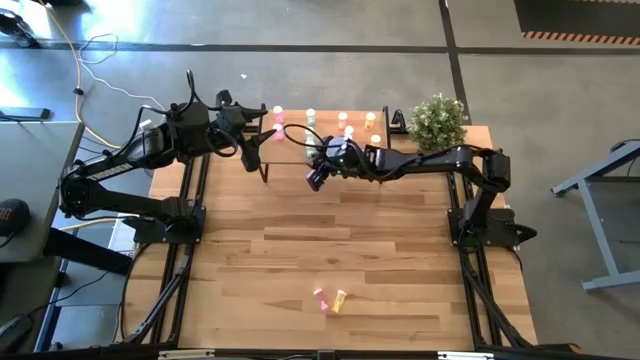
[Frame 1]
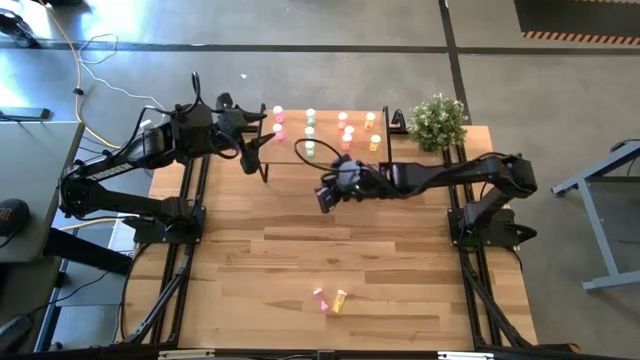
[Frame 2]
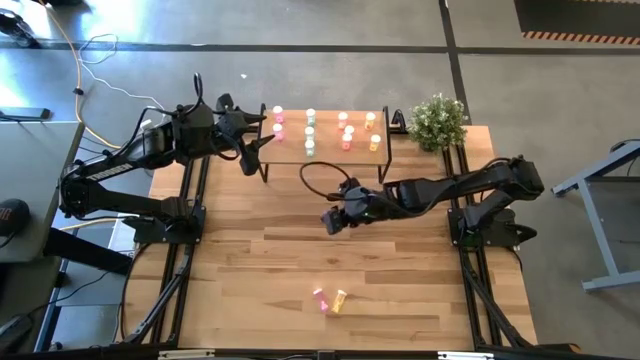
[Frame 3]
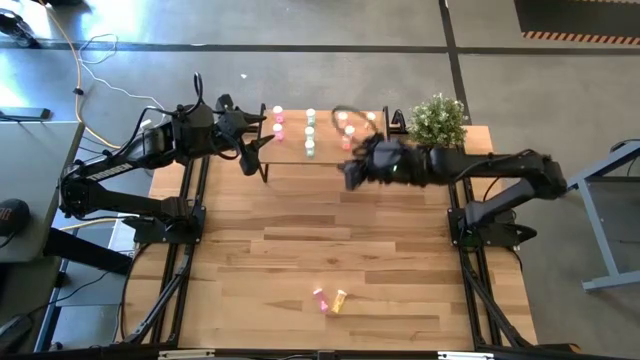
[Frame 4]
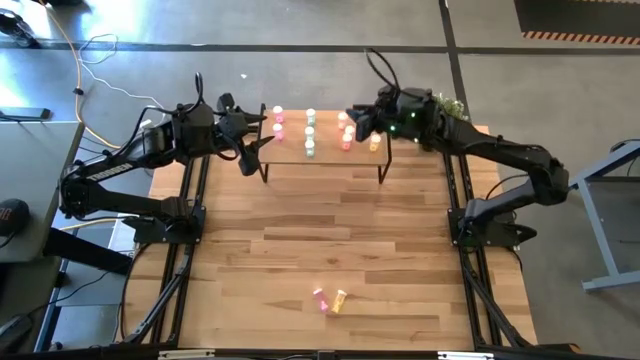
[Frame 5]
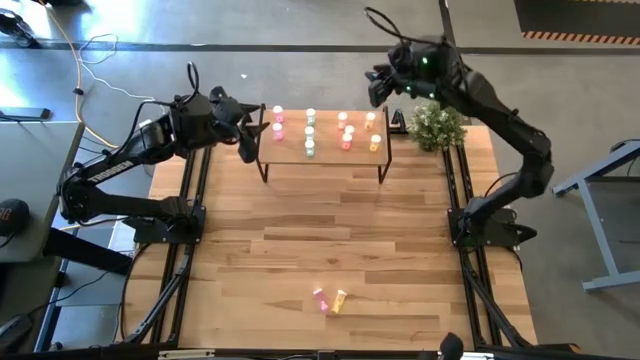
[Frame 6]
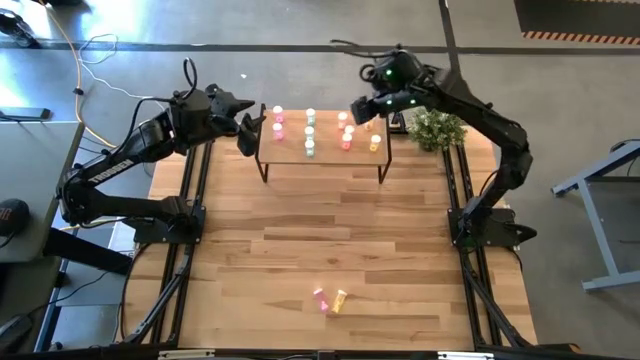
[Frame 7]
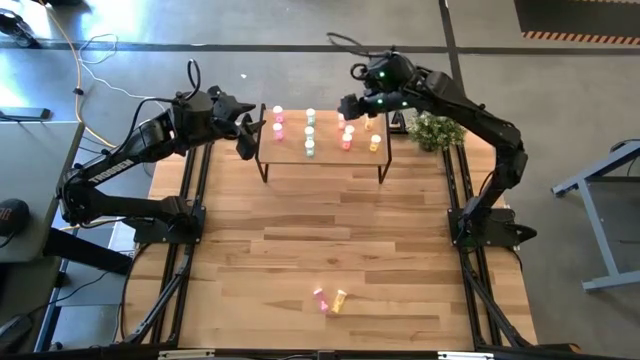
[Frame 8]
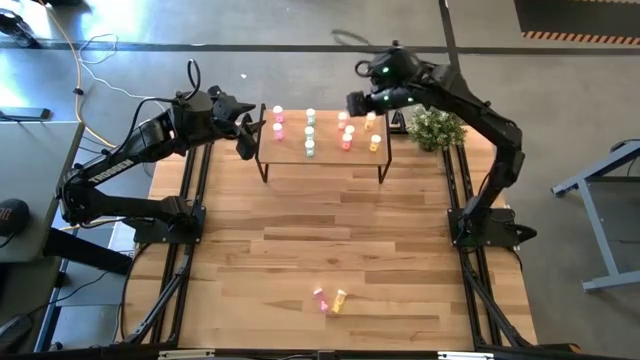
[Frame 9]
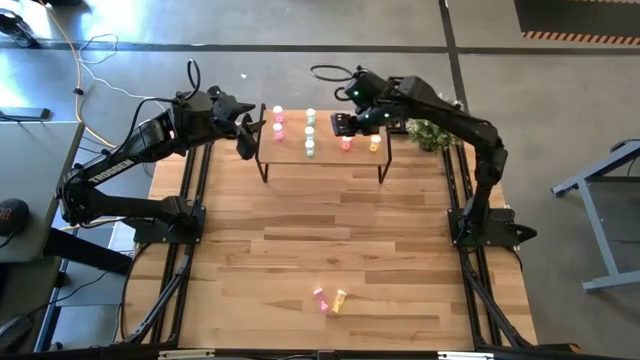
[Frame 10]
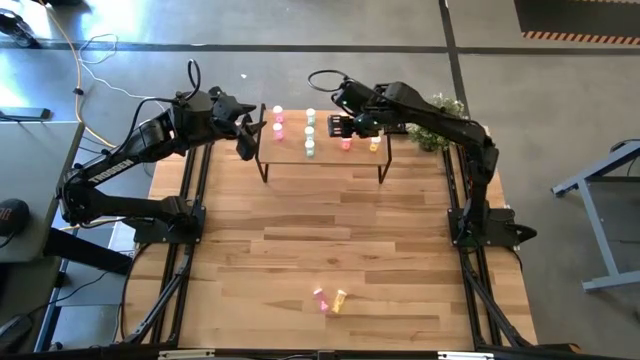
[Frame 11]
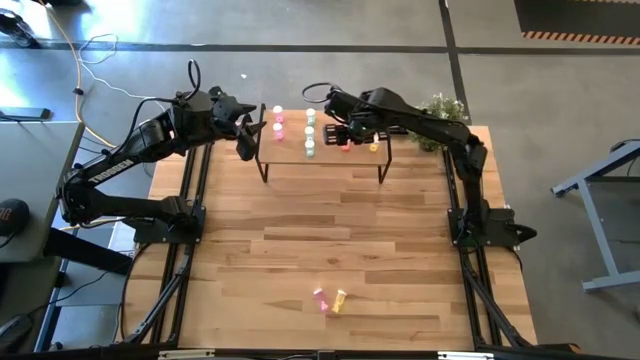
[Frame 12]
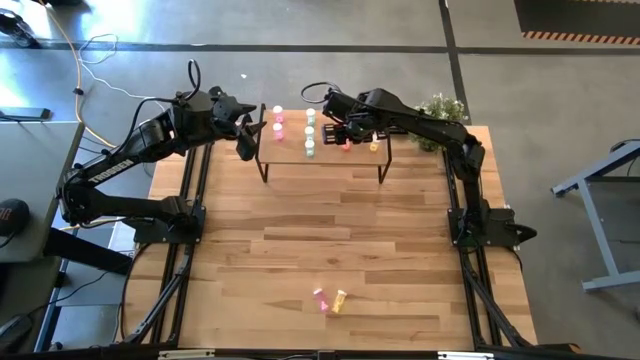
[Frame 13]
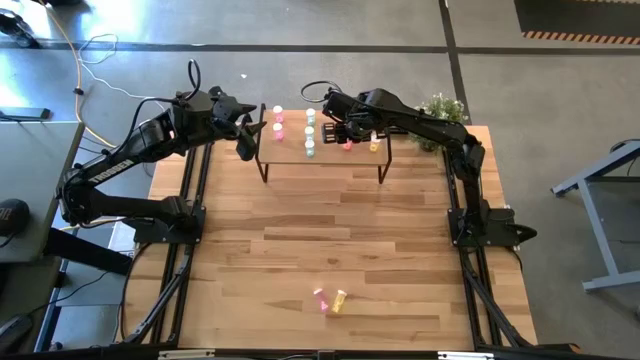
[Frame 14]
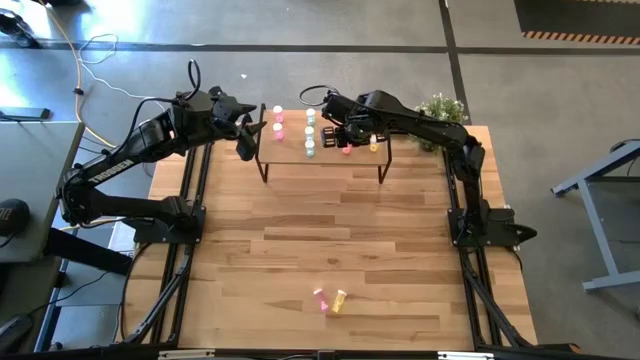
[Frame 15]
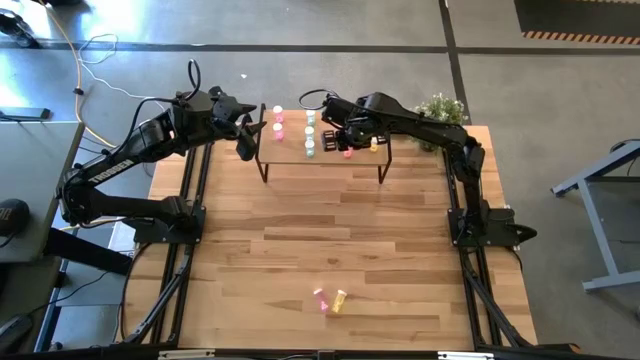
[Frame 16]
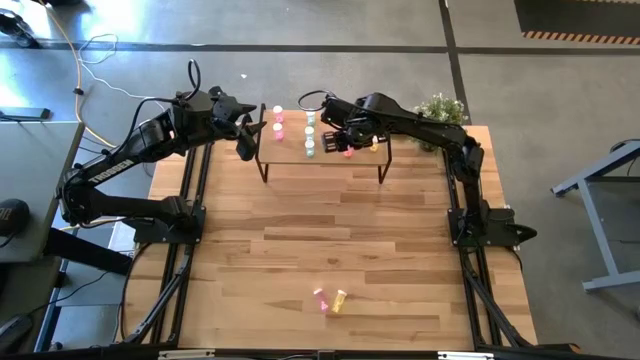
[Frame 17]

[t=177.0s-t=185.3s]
Task: Pick and place medicine bottles onto shelf by color
Adjust the orange pill bottle on the shelf

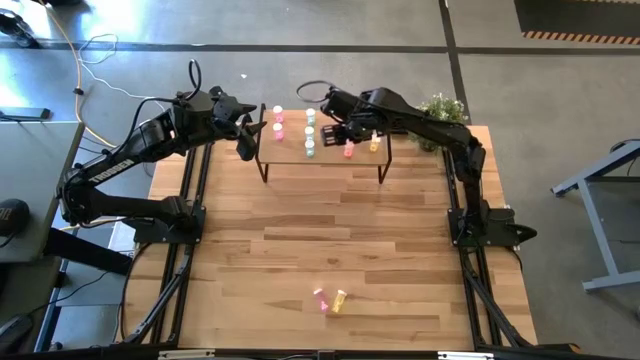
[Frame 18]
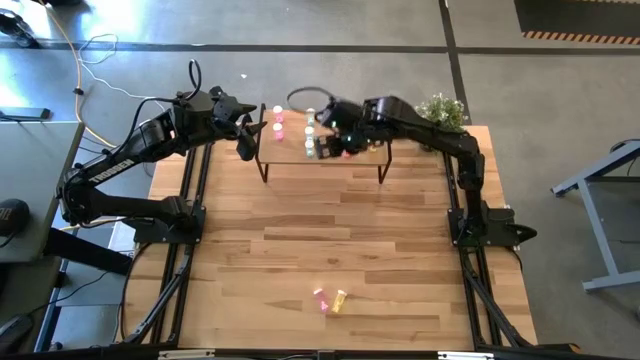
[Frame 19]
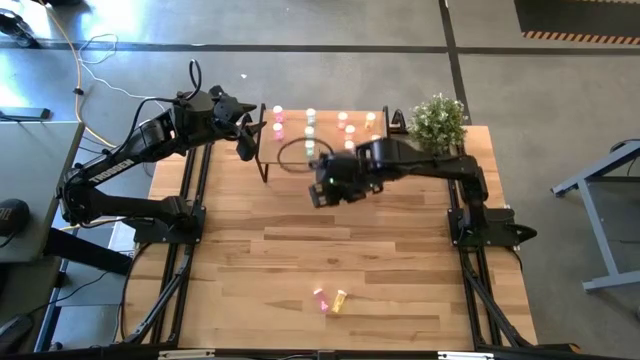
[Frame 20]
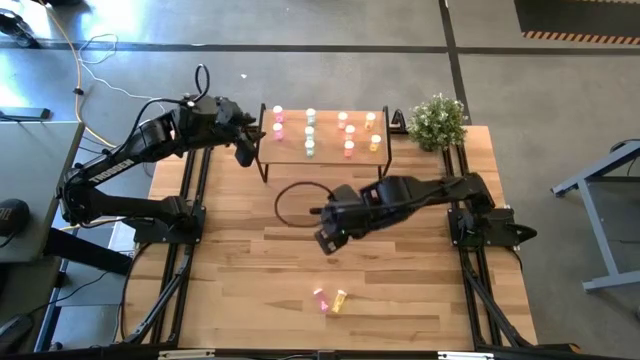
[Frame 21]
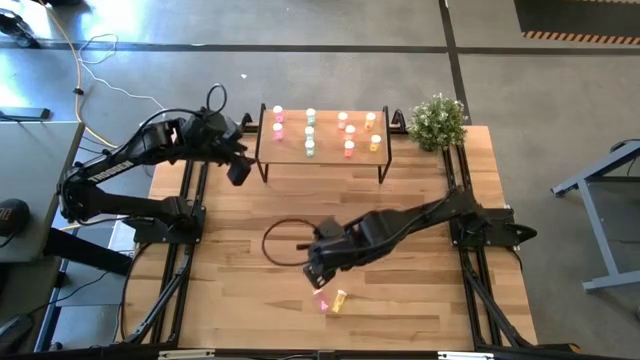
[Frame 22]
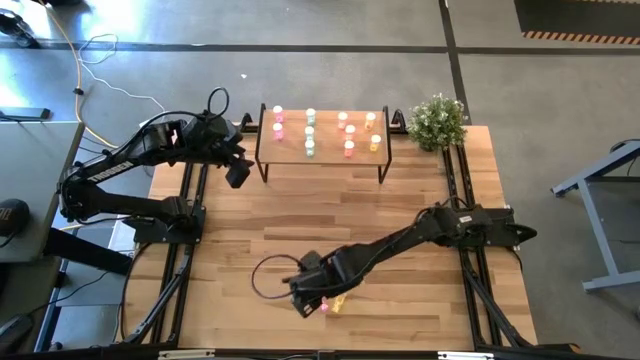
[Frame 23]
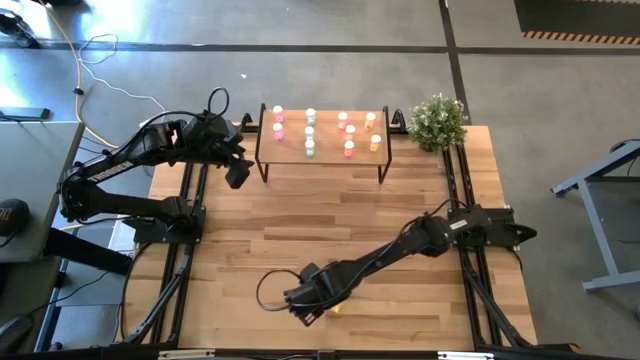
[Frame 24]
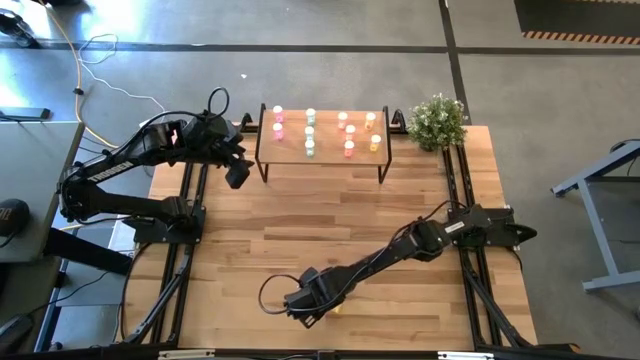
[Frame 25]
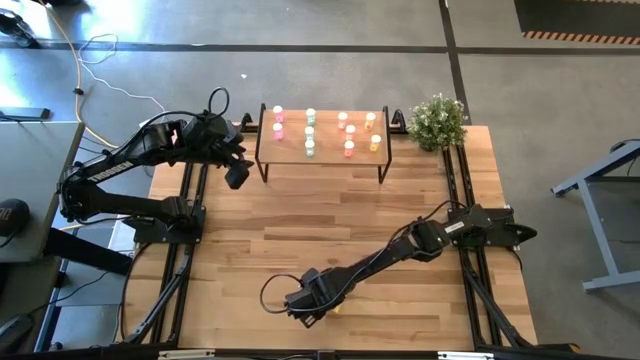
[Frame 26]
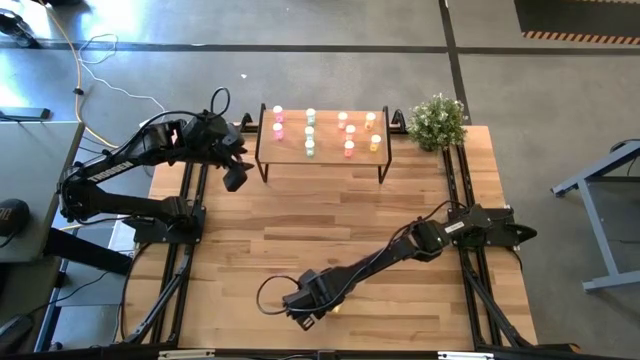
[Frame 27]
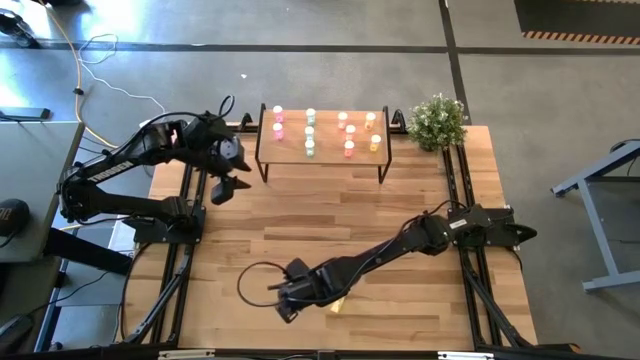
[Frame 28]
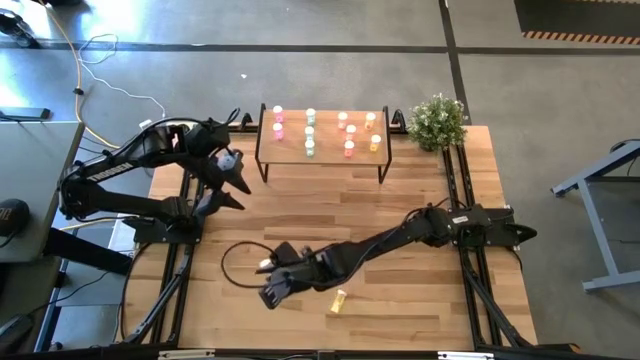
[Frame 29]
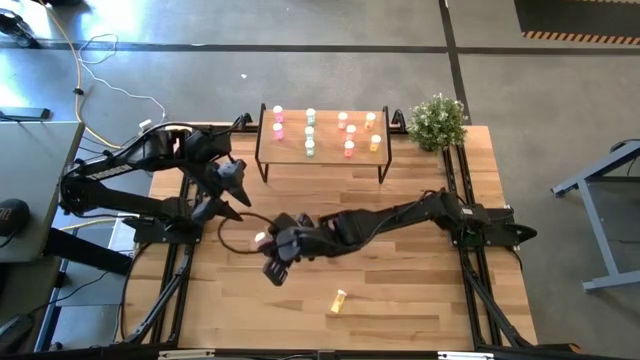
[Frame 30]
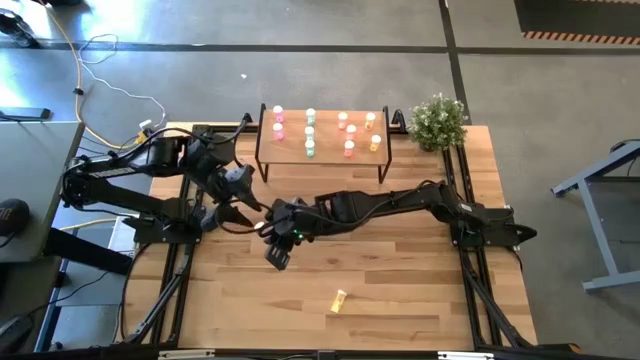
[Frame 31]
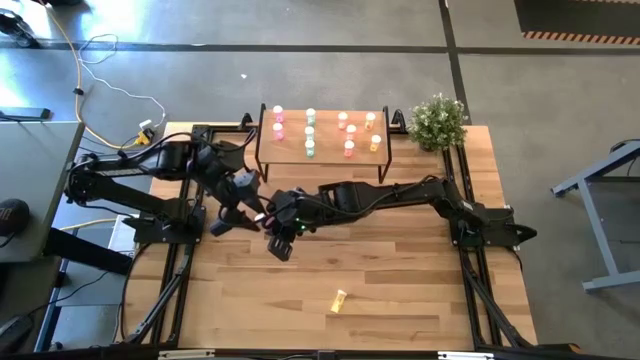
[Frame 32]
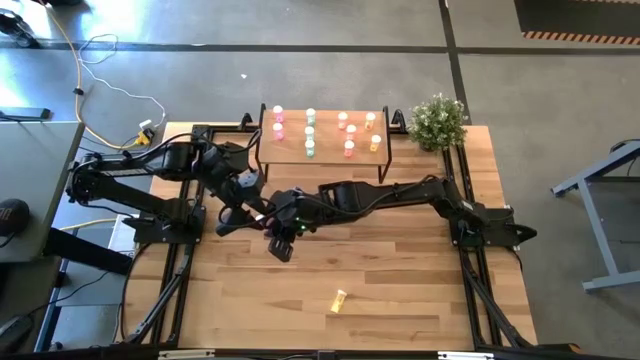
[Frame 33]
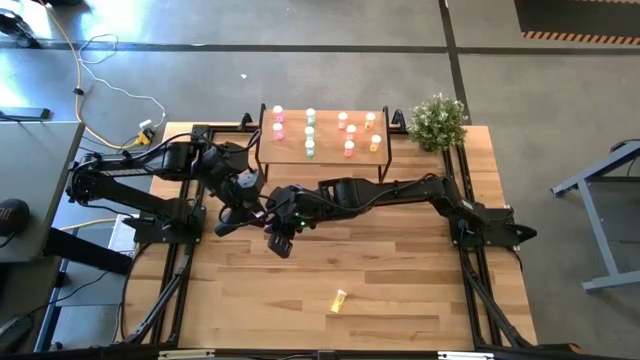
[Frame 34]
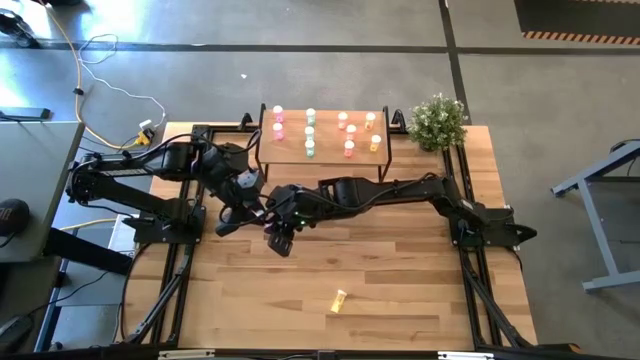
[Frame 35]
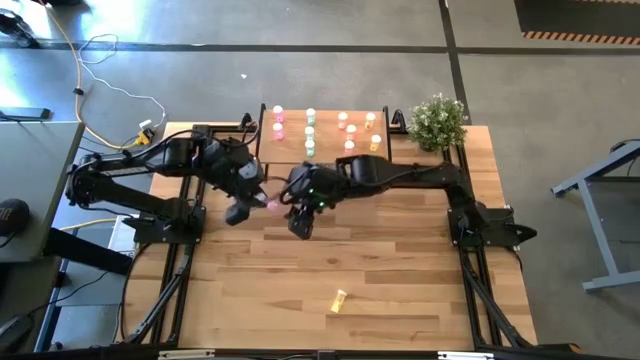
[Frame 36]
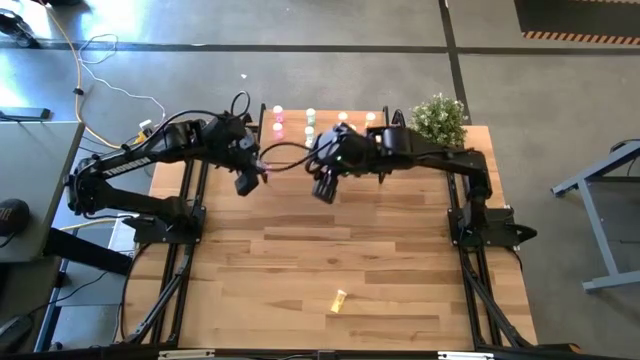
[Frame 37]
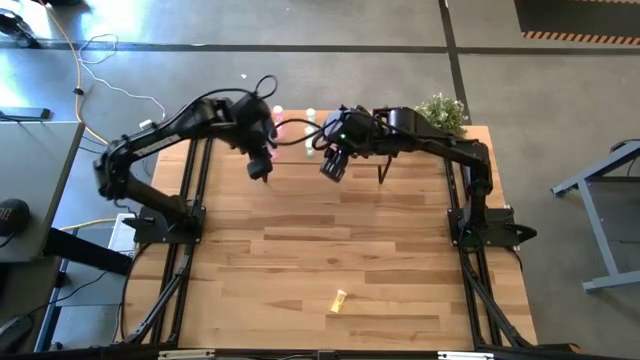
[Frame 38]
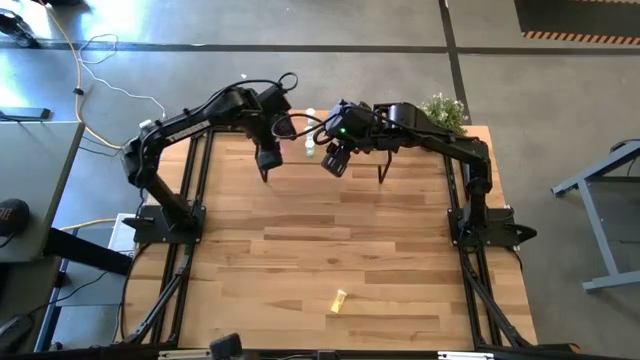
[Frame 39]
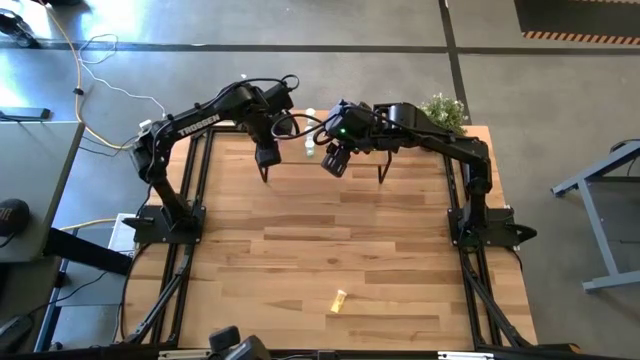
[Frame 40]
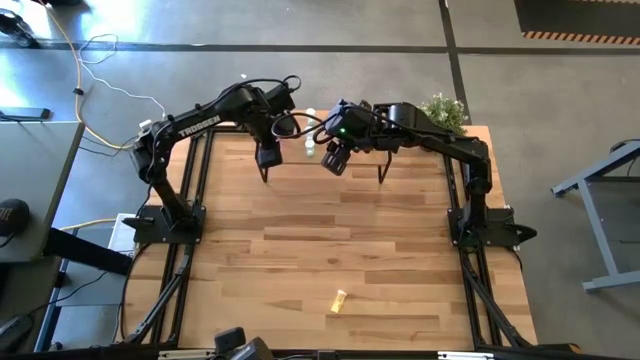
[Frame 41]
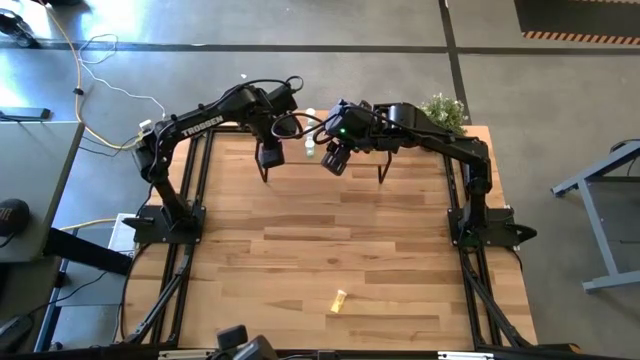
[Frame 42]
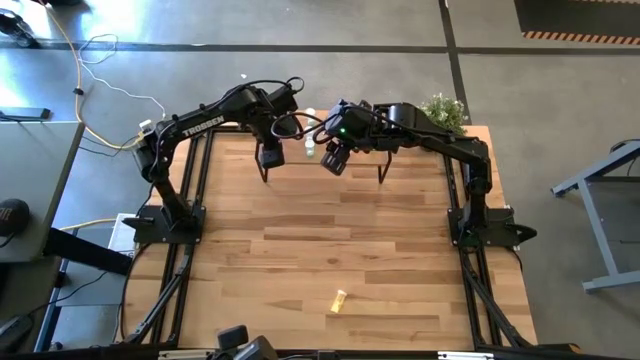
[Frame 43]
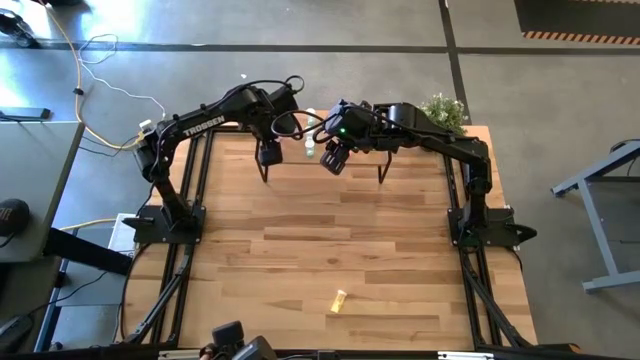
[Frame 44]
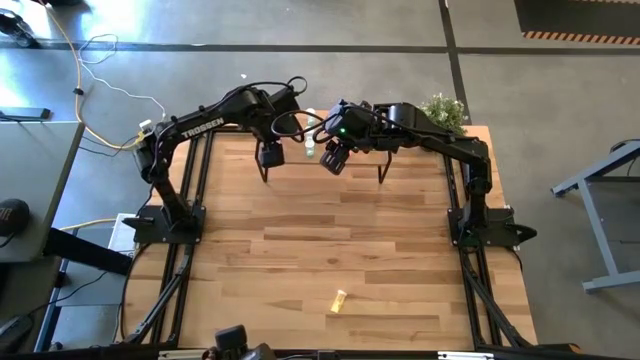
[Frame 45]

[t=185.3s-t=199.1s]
Put the pink pill bottle on the shelf aligned with the other pink pill bottles
